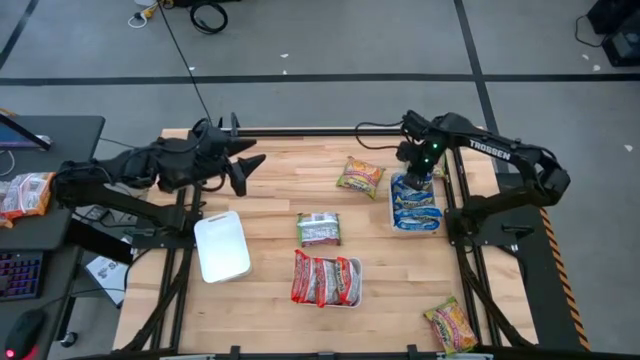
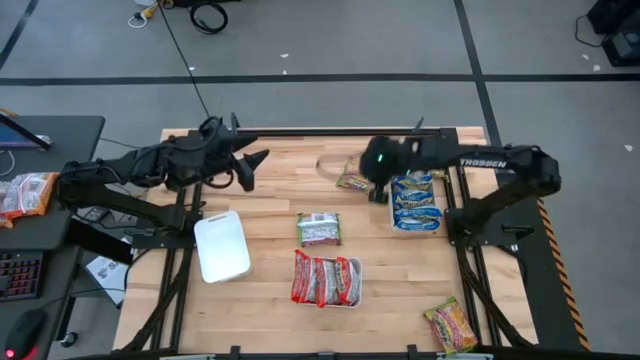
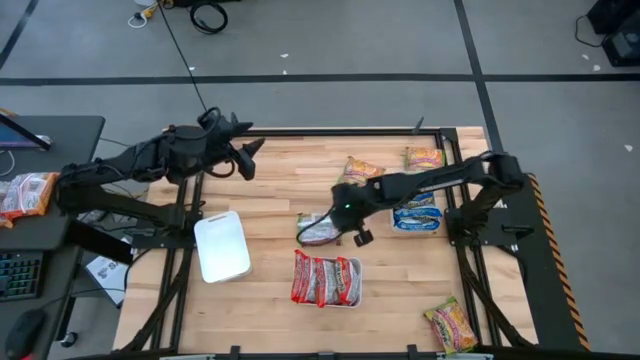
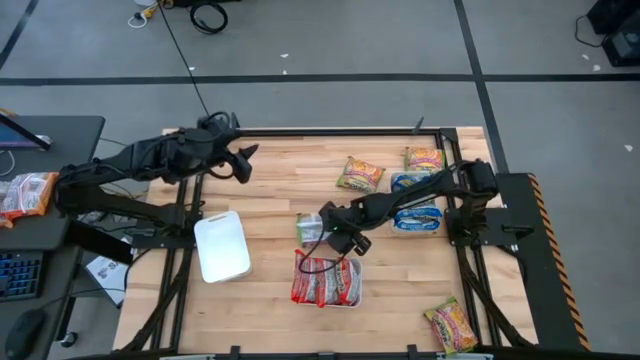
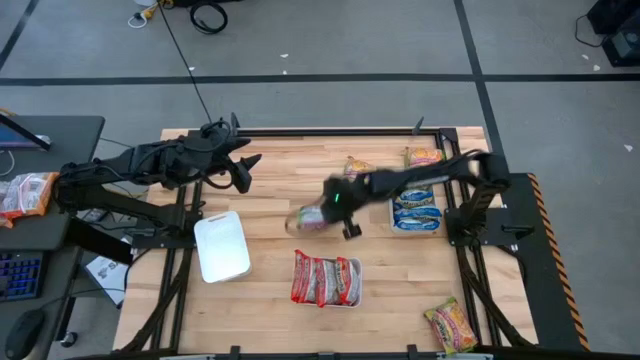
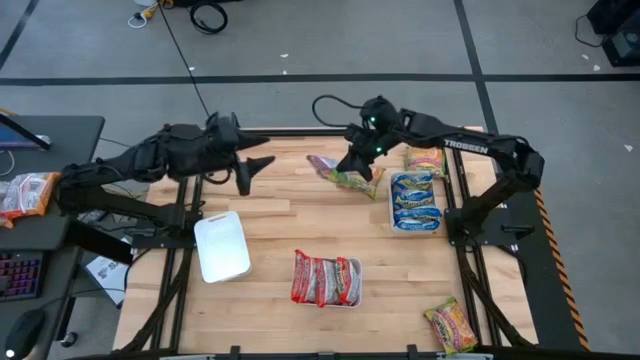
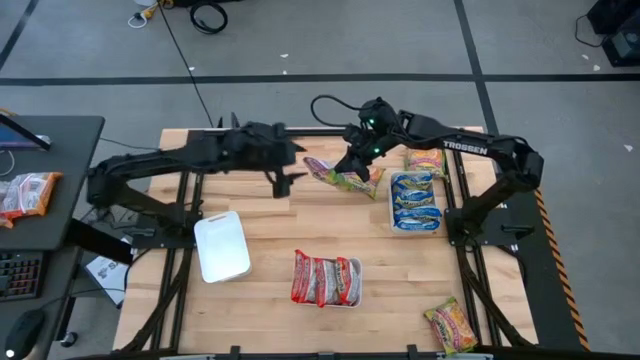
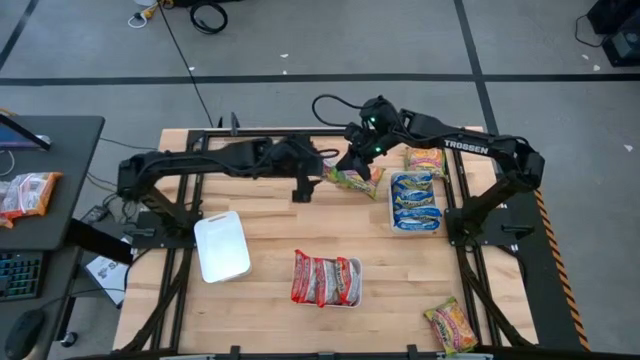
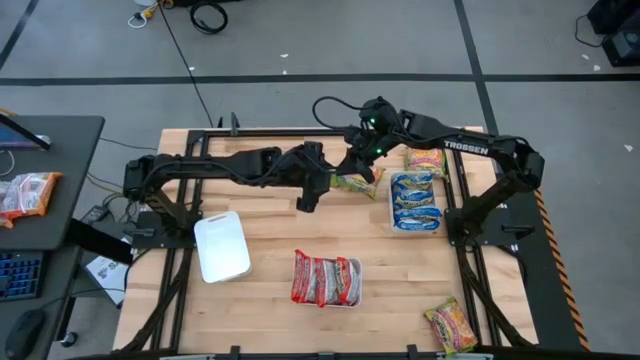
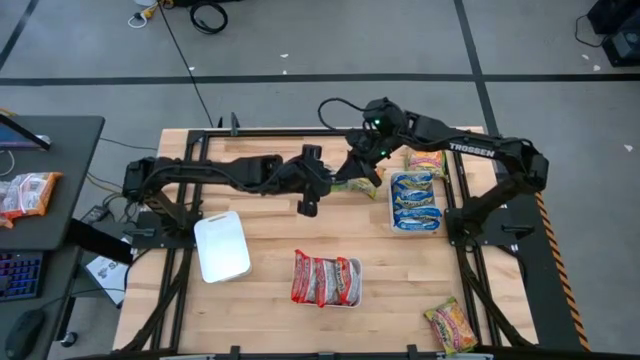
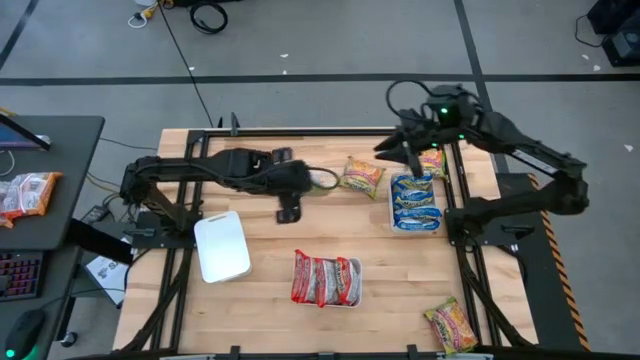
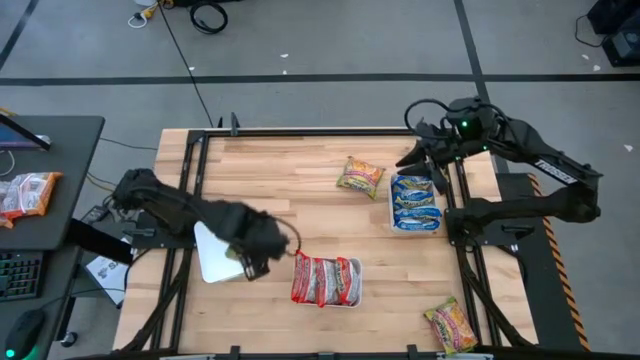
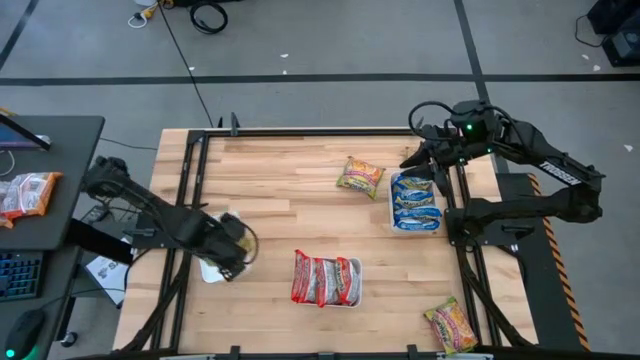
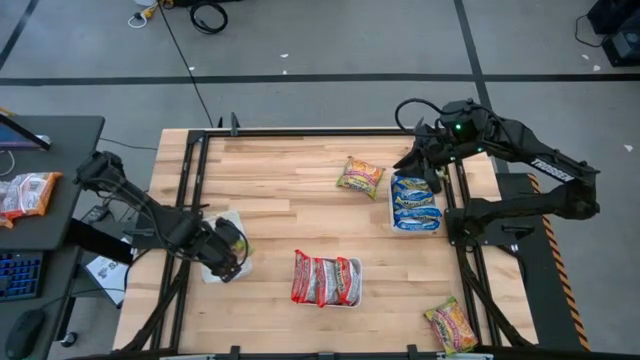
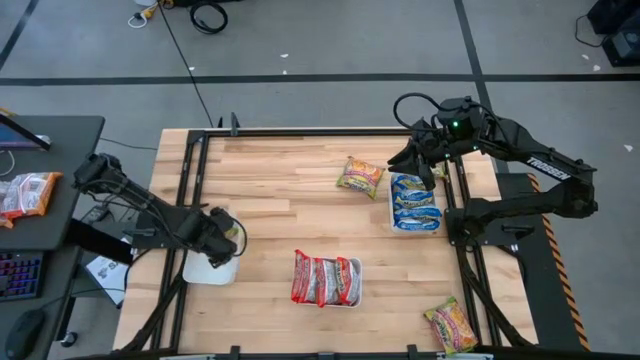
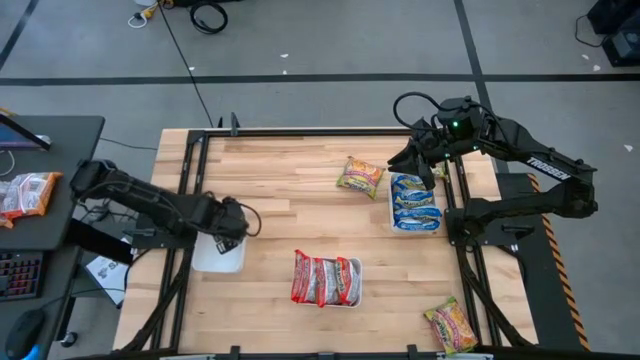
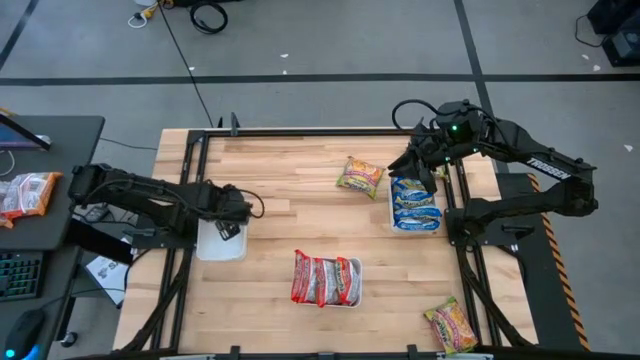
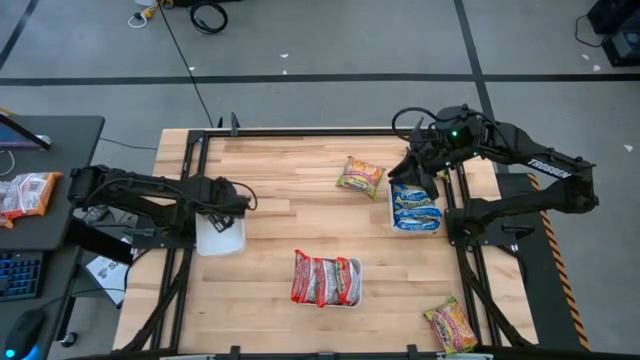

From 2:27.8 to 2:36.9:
Task: Sort Maruchan noodles
Put the middle green noodle pack into the left white bin

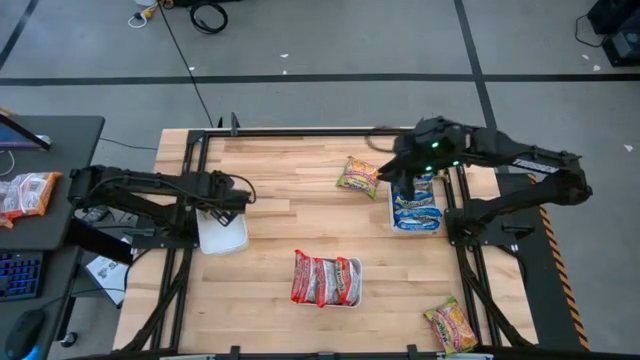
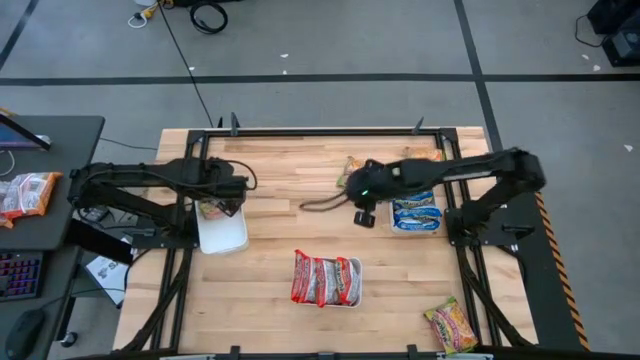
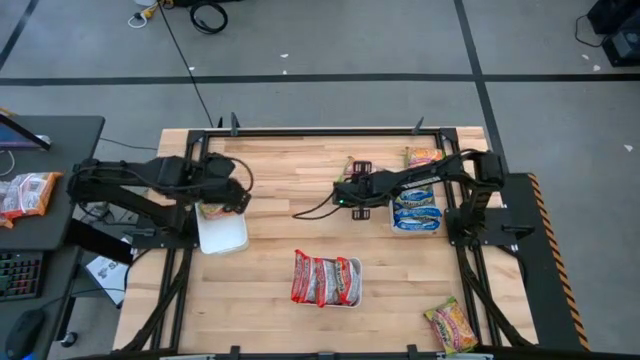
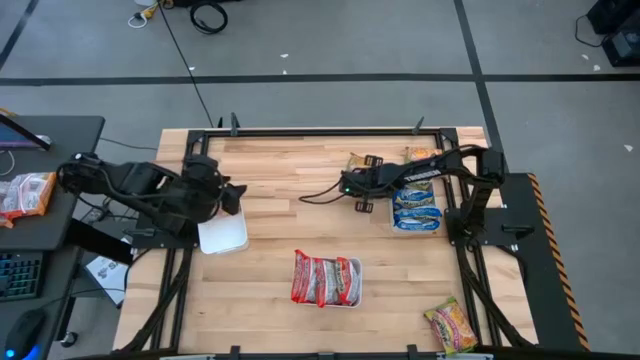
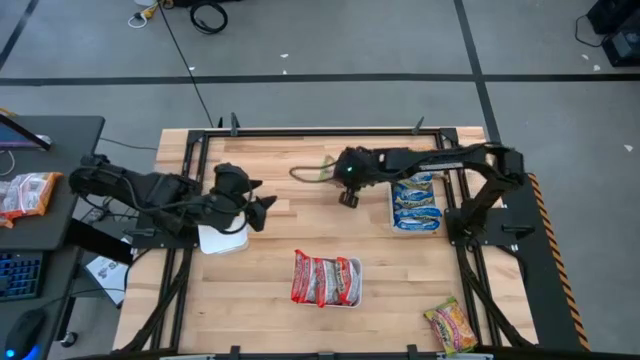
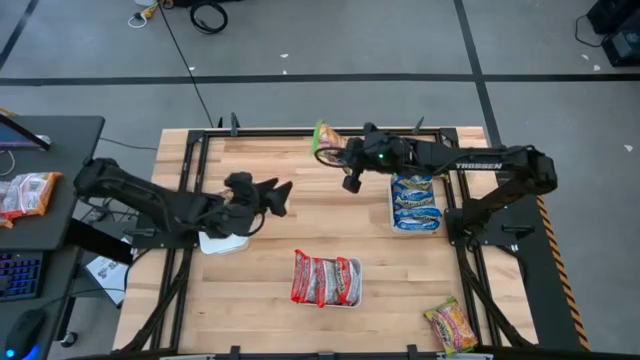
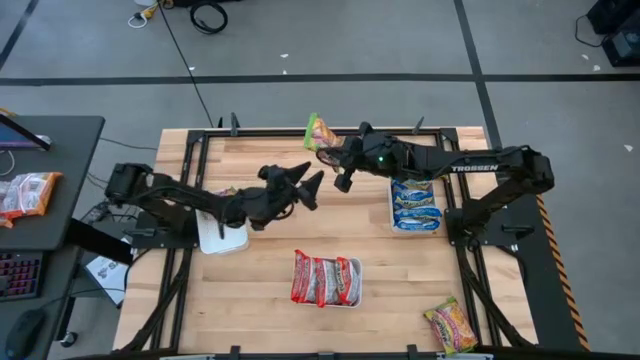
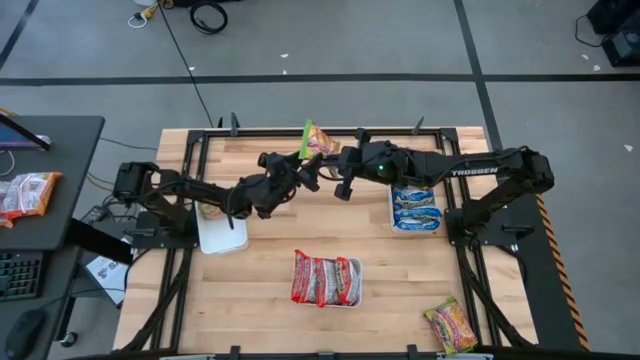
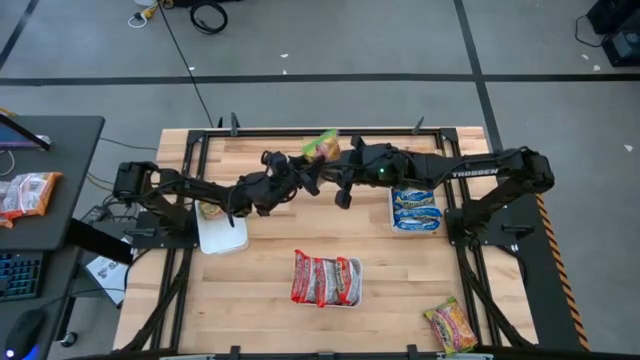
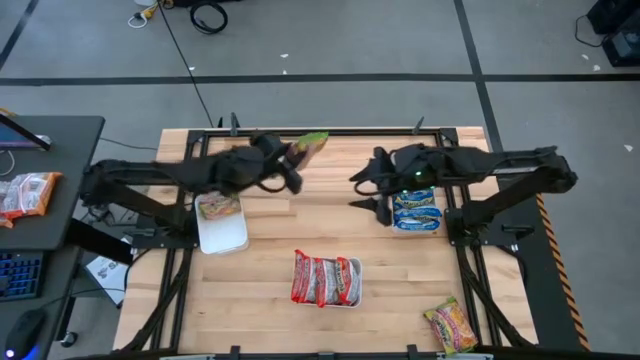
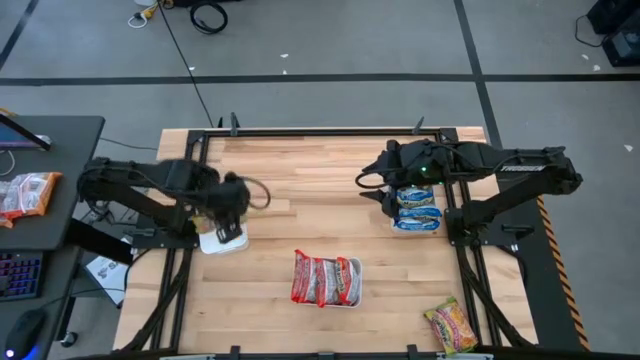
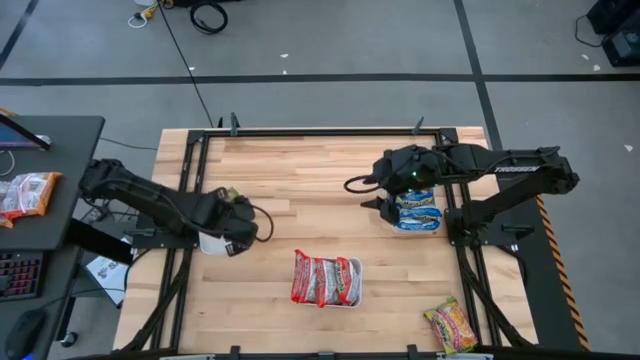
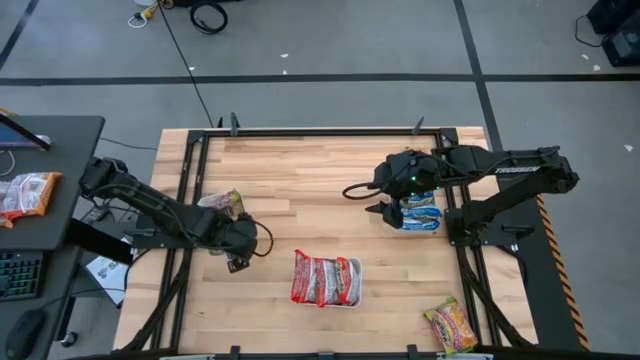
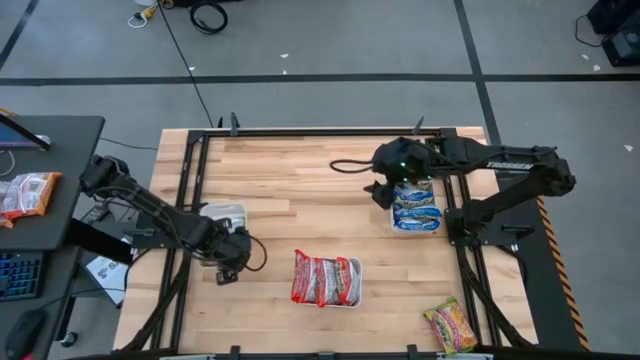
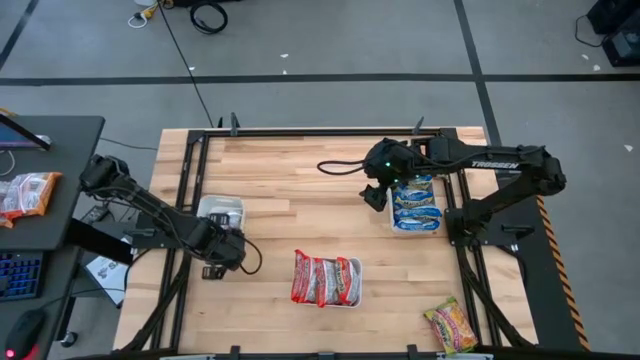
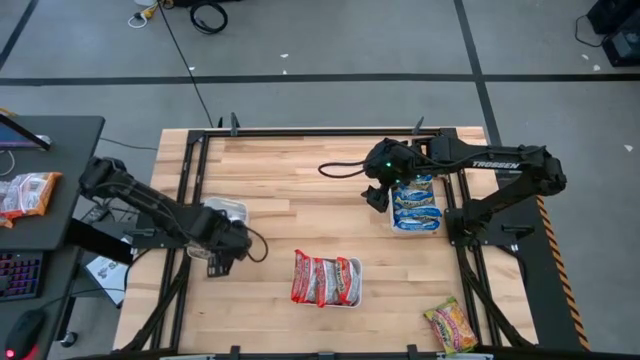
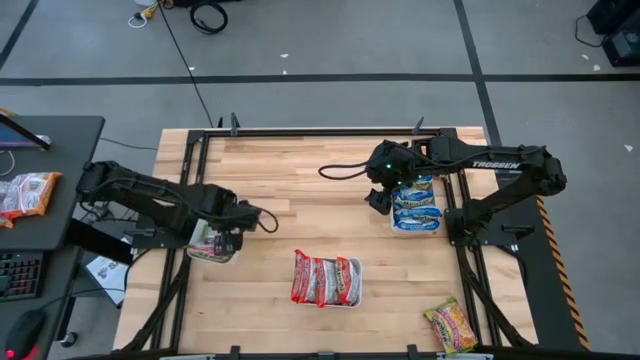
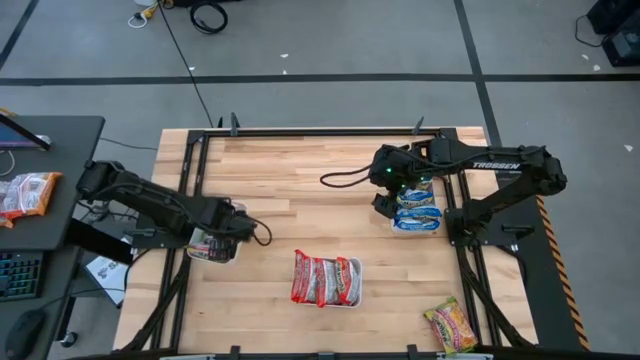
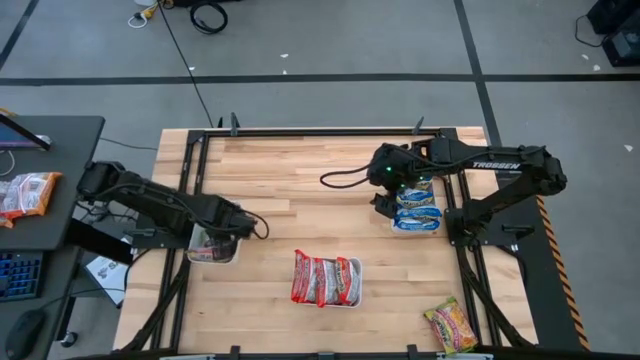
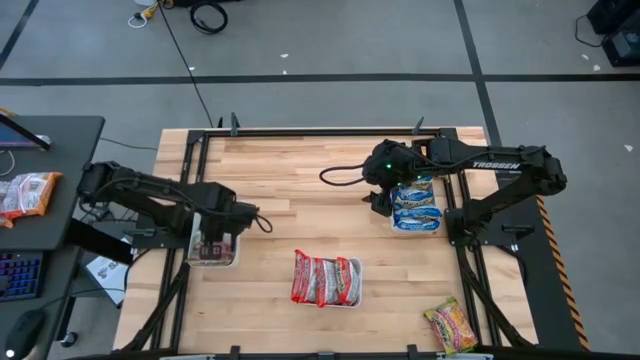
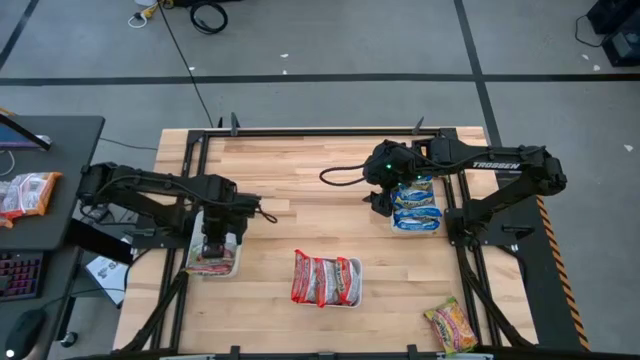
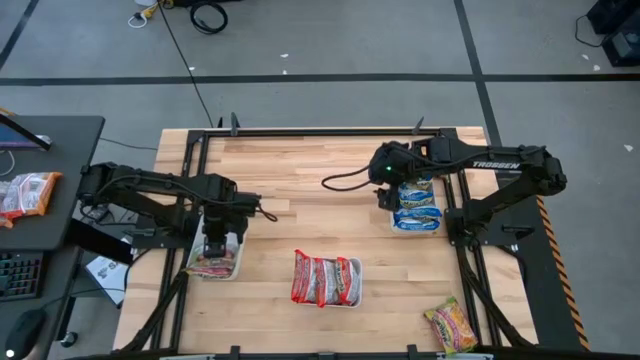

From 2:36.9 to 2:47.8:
Put the left green noodle pack into the left white bin

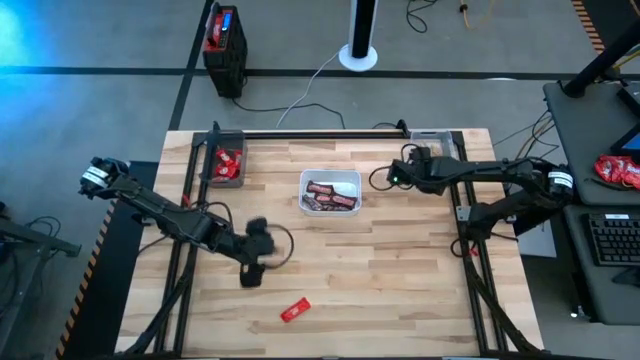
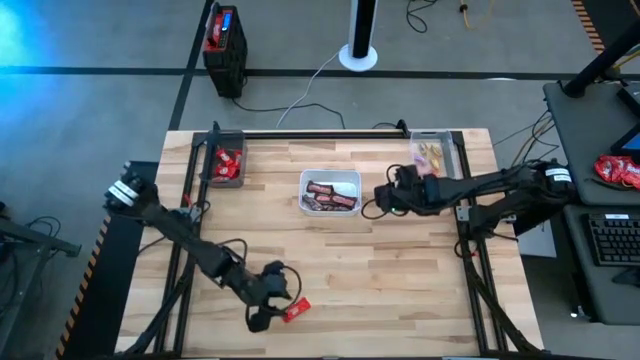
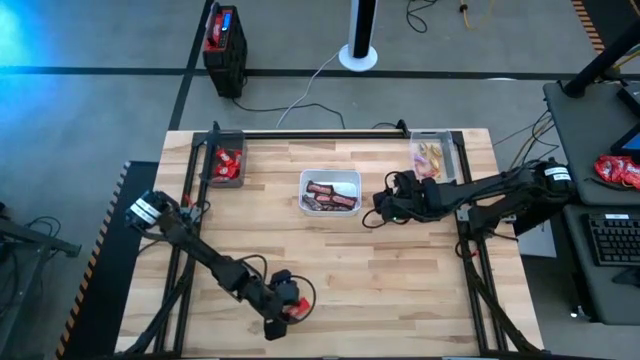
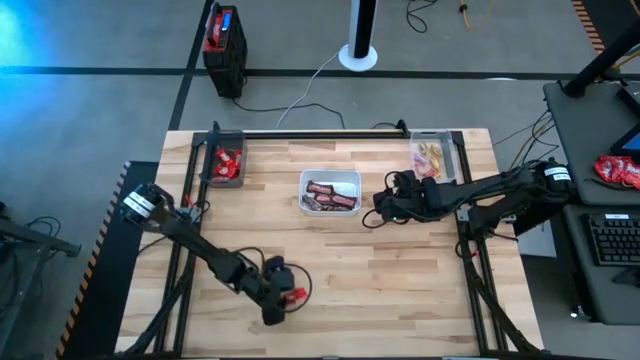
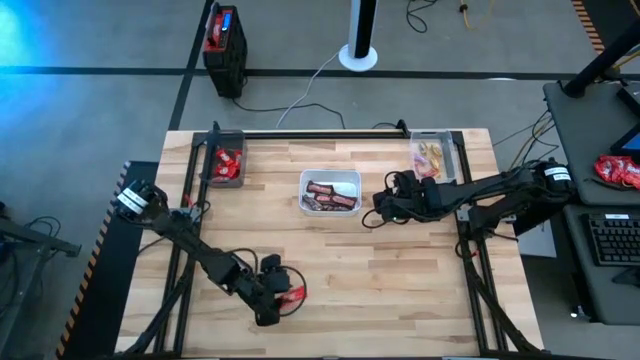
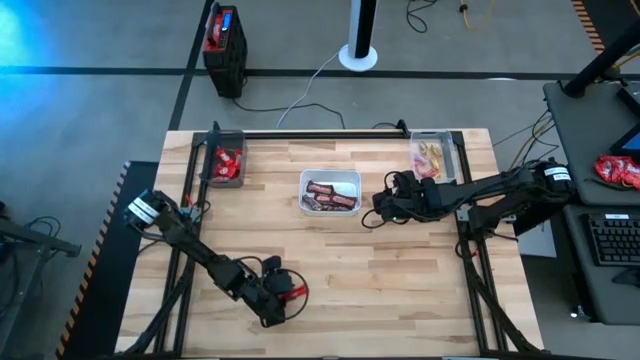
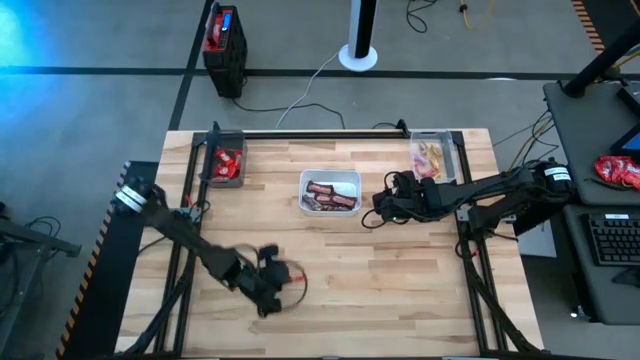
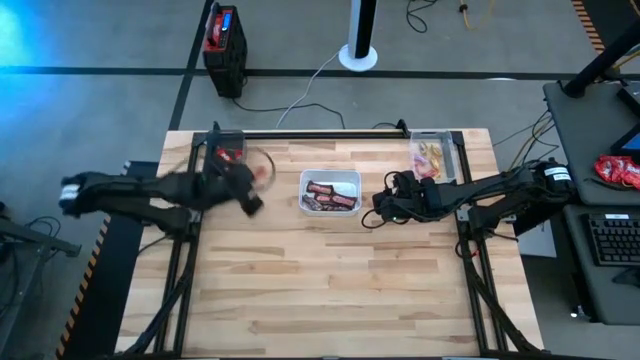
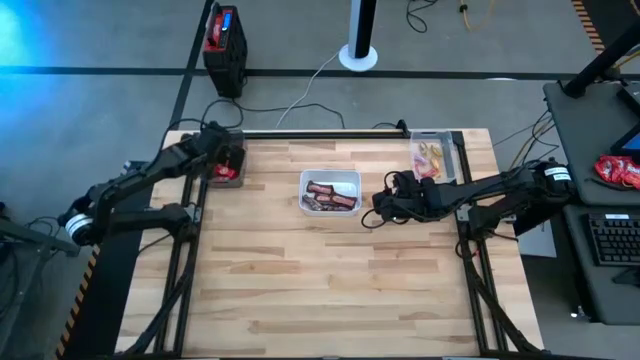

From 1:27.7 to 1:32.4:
Task: Sort candy by brand, put in halloween buckets
Put the red chocolate bar into the black bin
